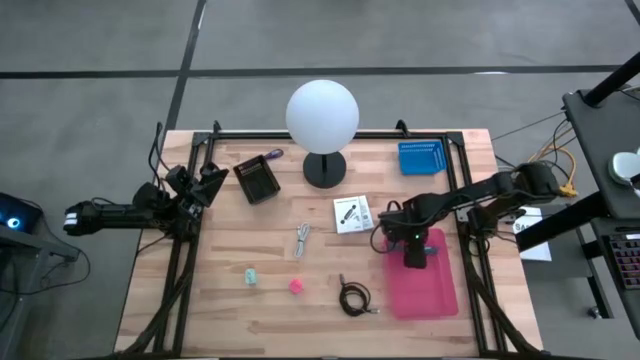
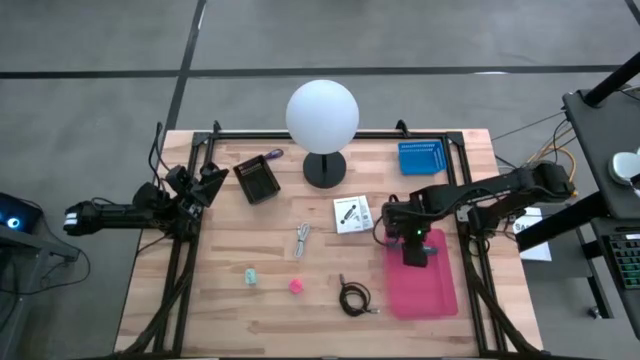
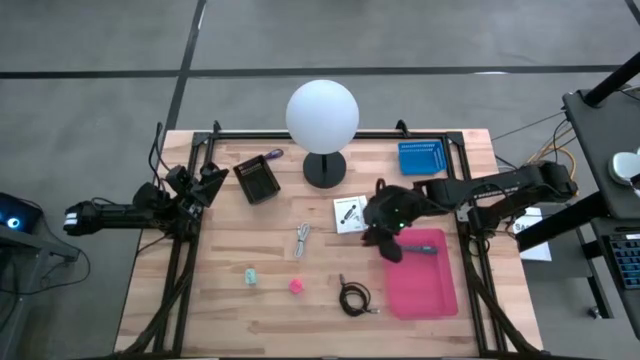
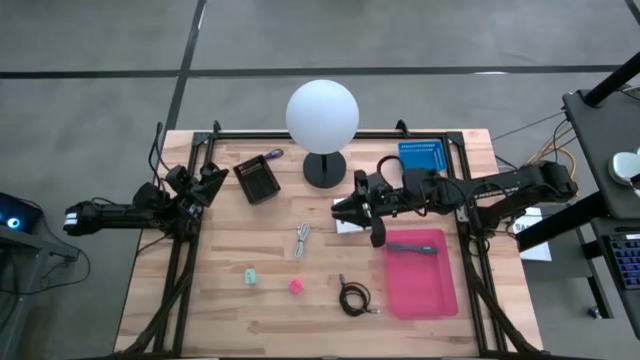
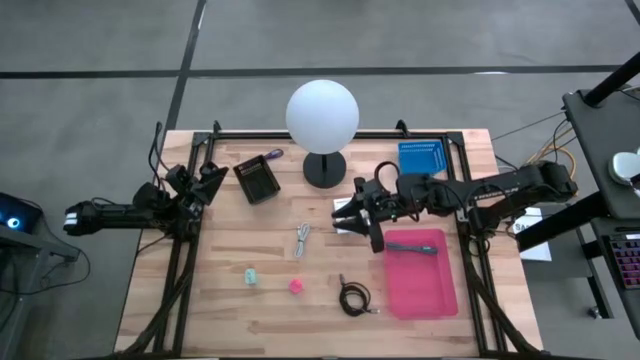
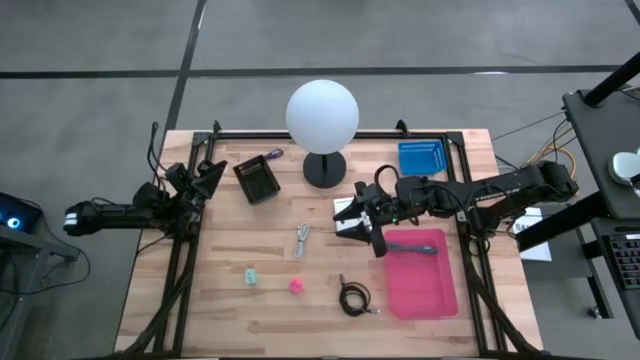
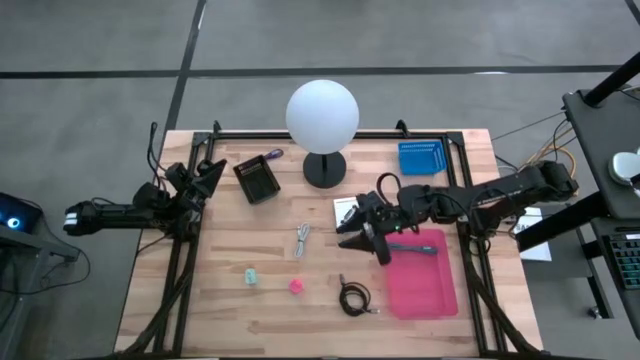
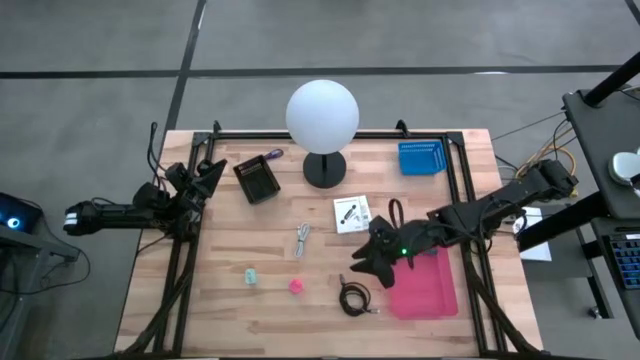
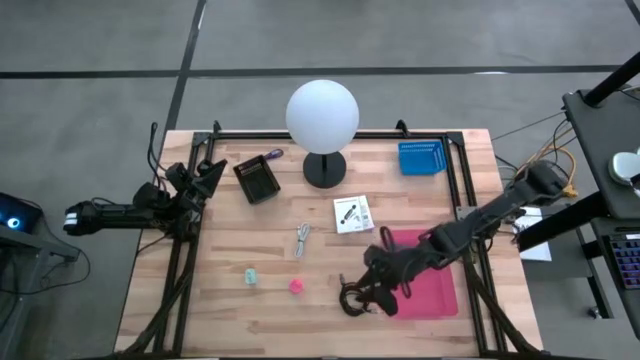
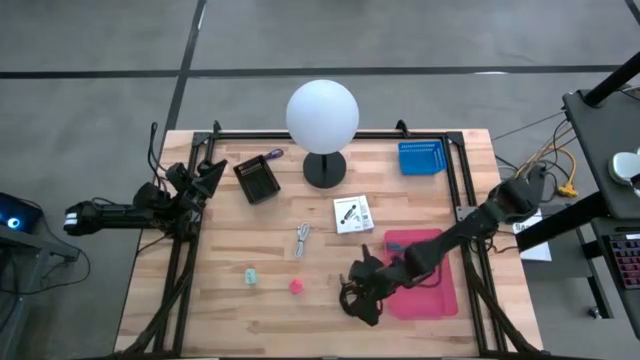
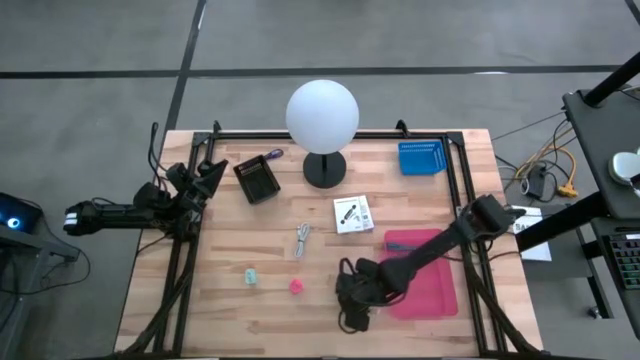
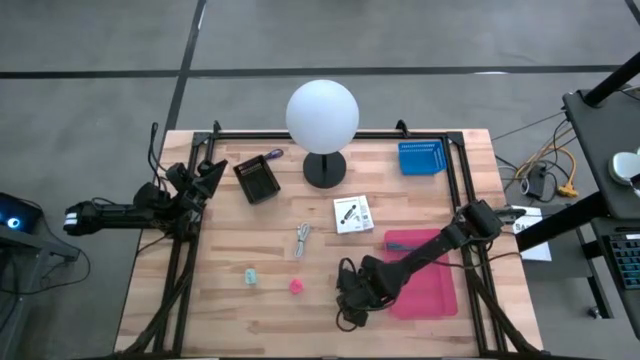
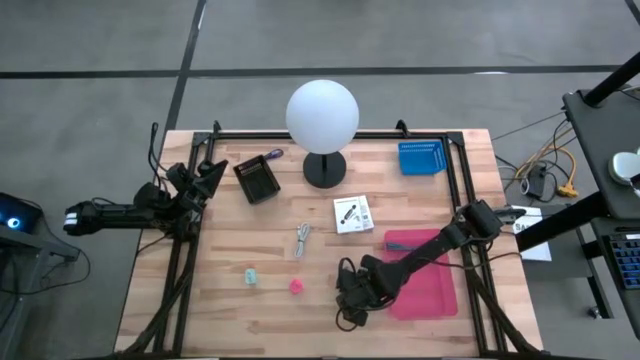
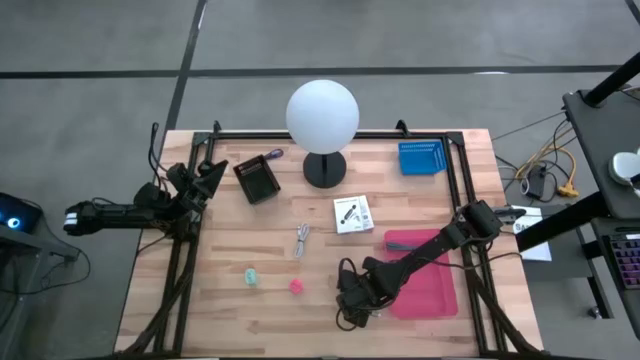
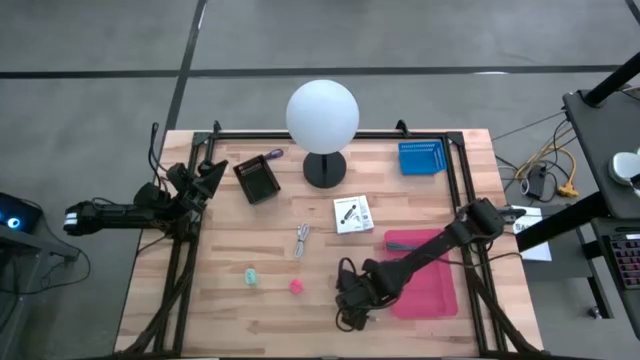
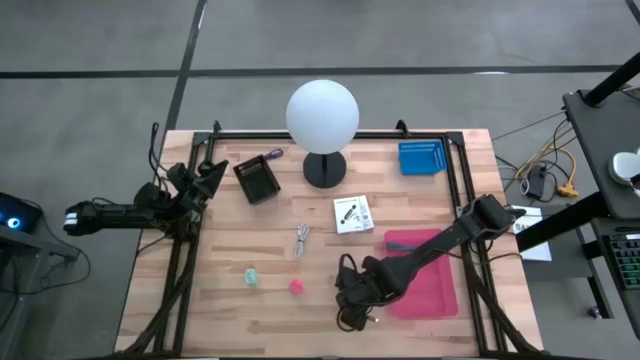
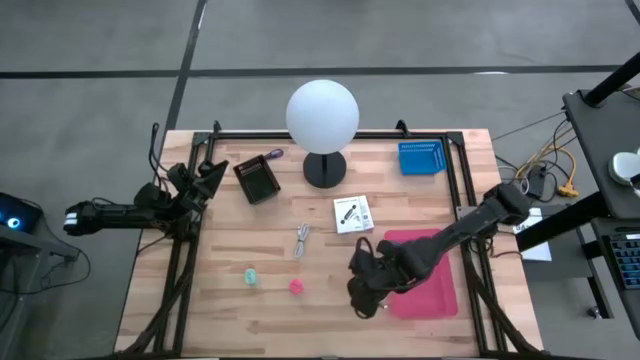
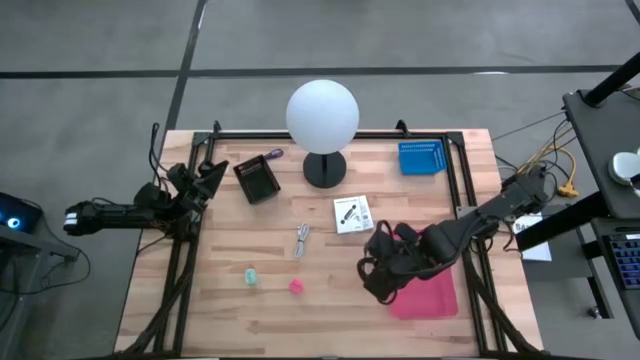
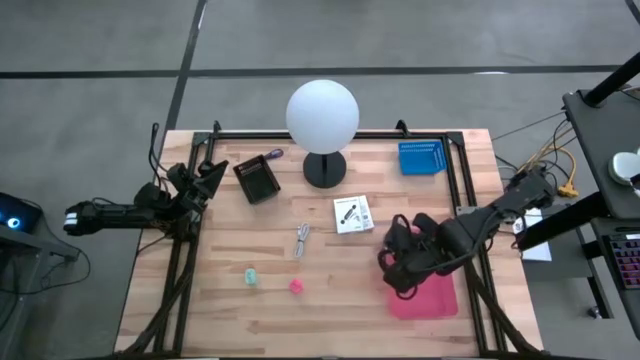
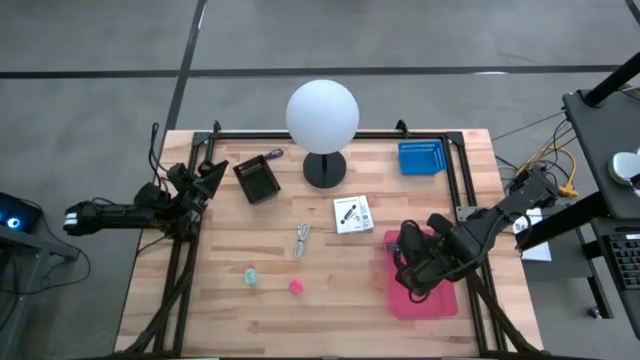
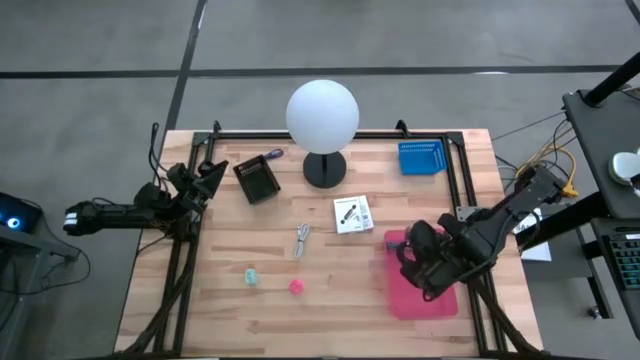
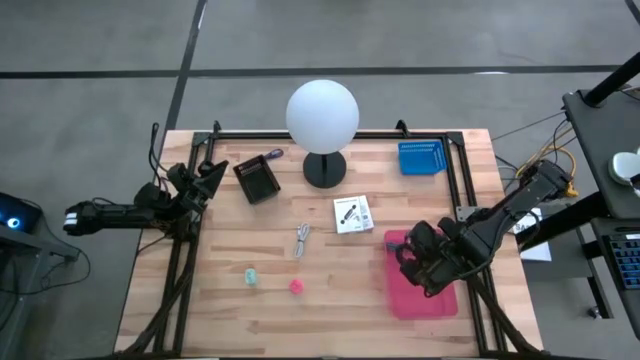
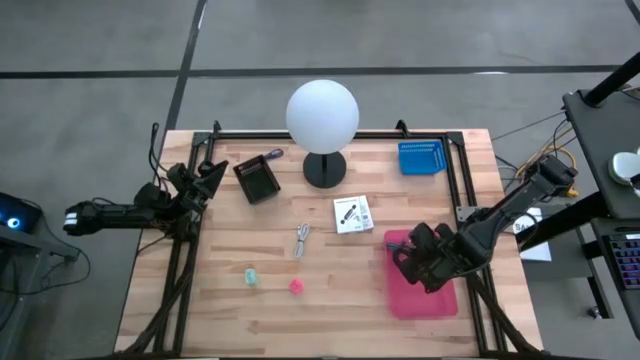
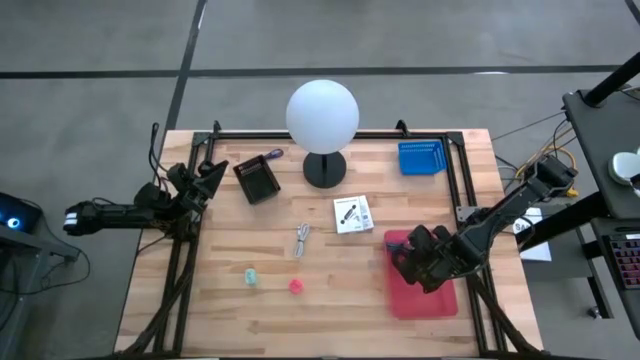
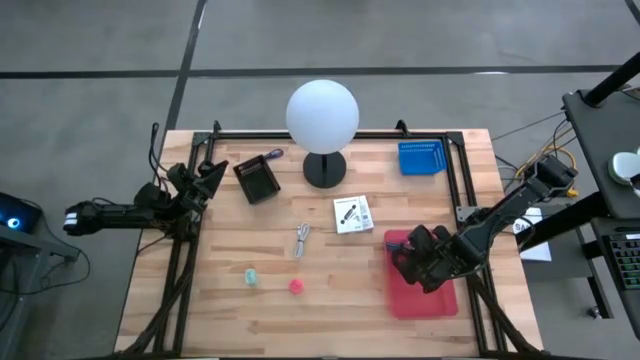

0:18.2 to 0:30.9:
Task: Pick and place items into bin
Put the black charger cable into the pink bin

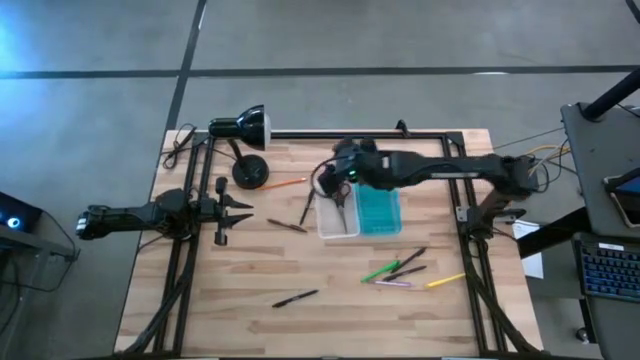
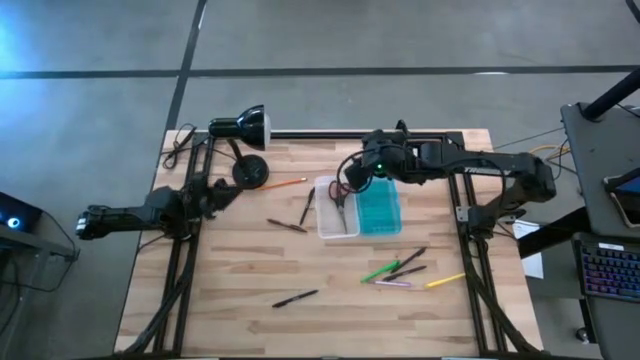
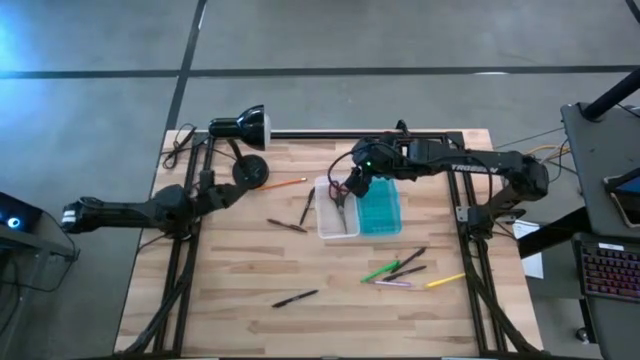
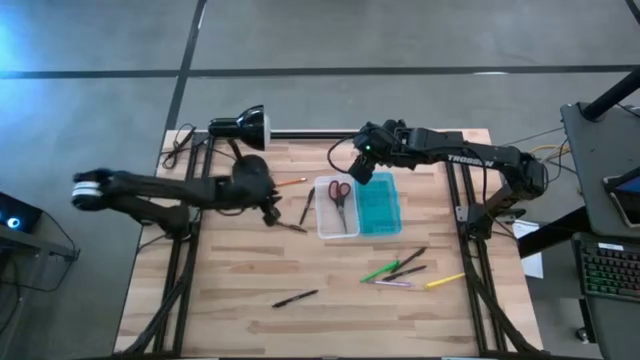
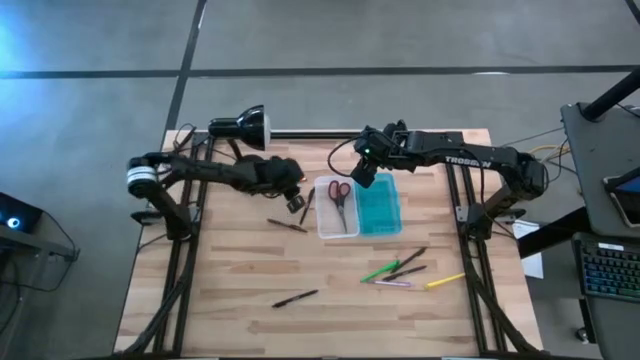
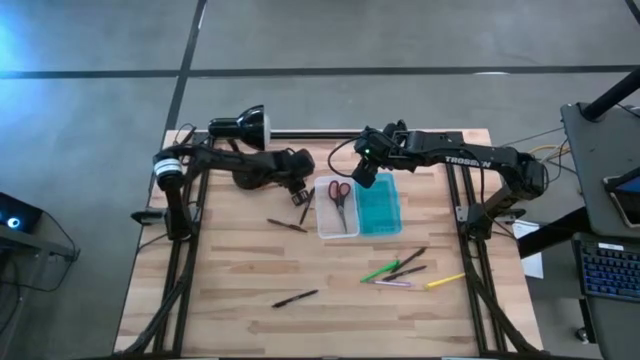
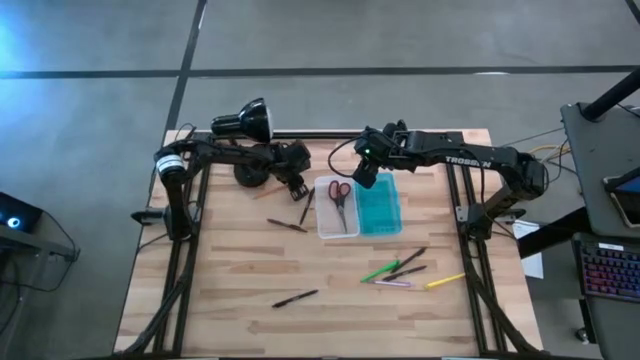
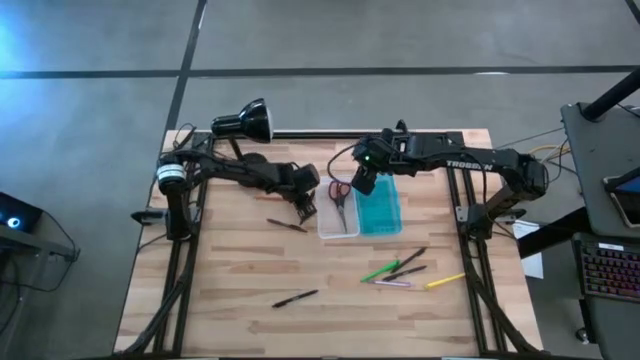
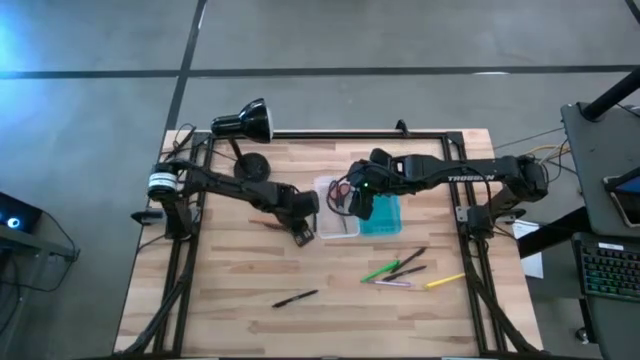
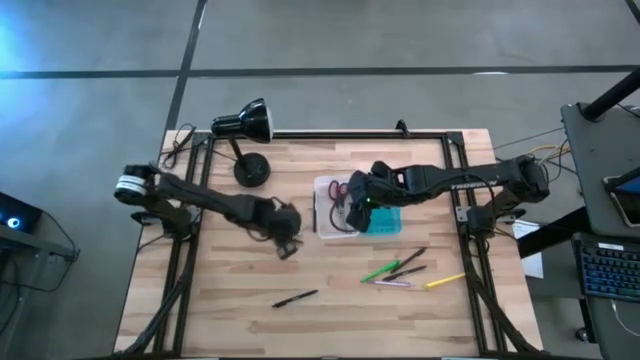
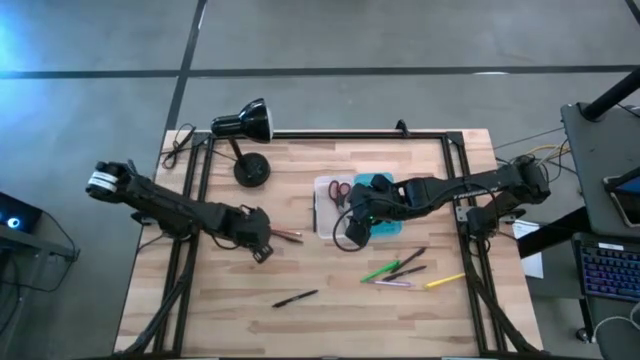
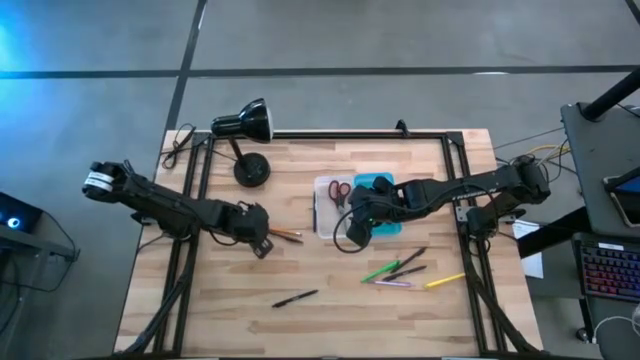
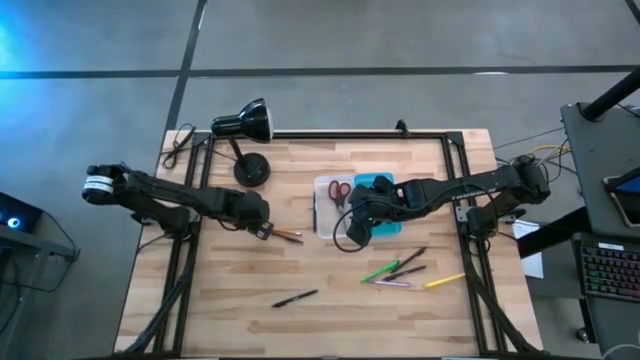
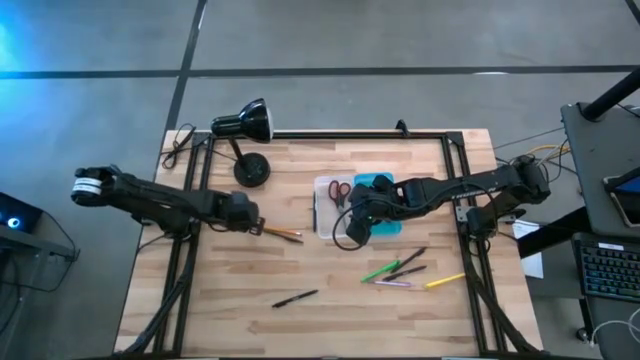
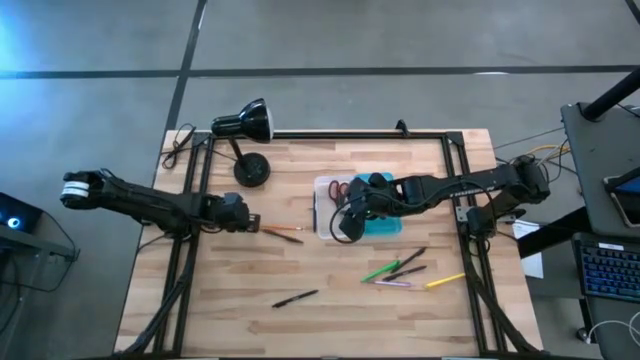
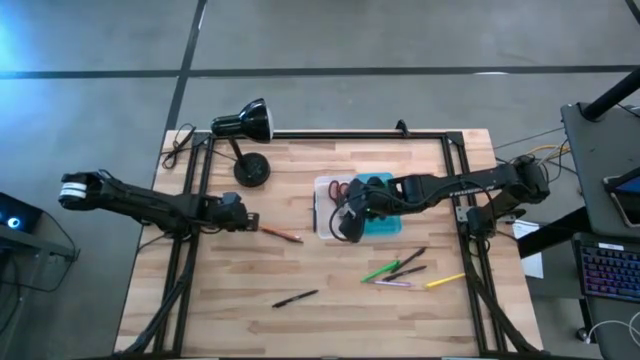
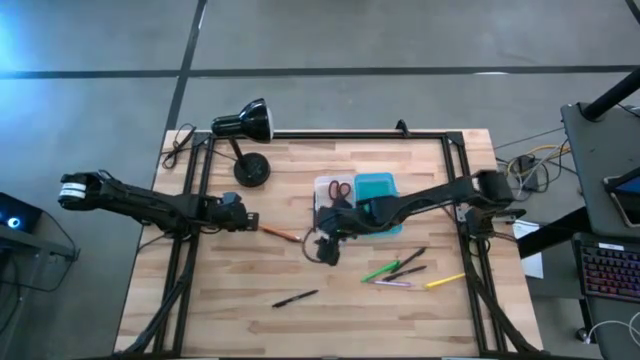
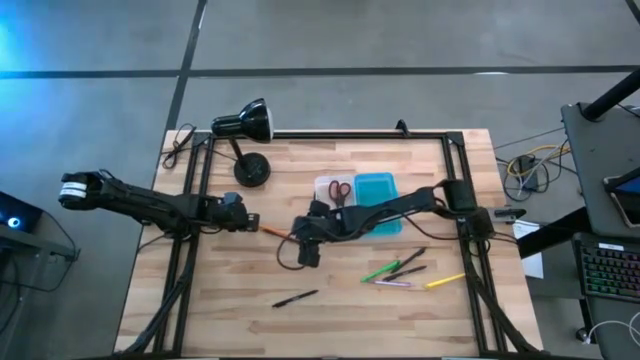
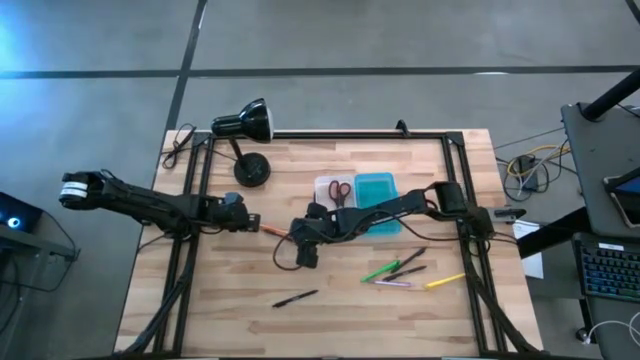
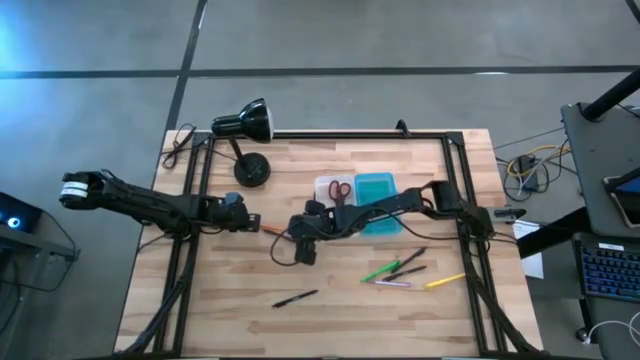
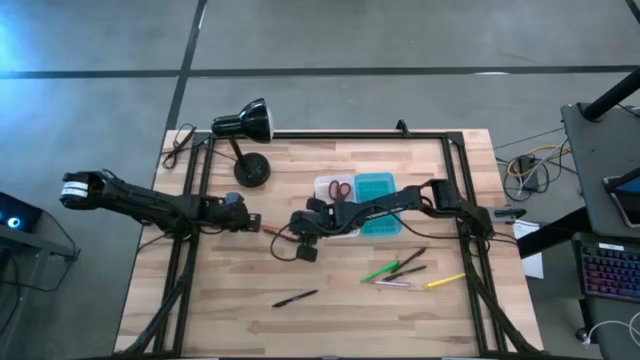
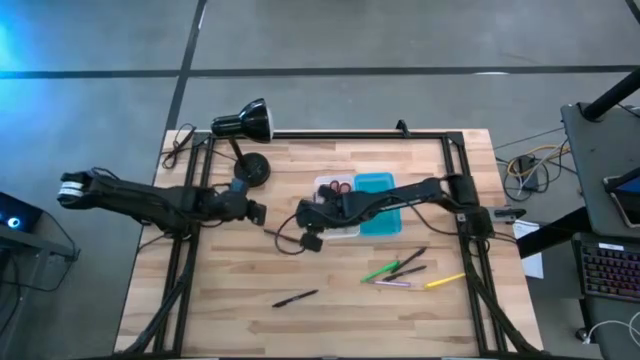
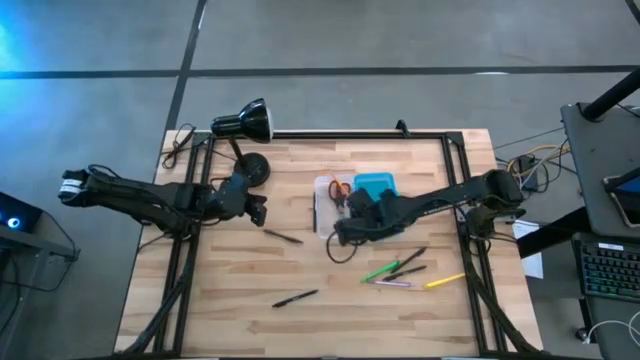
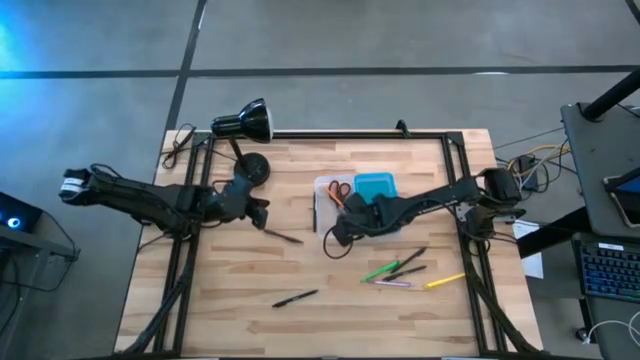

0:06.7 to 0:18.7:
Task: Pick & place school supplies into a supply box
Put the yellow pencil into the blue supply box
